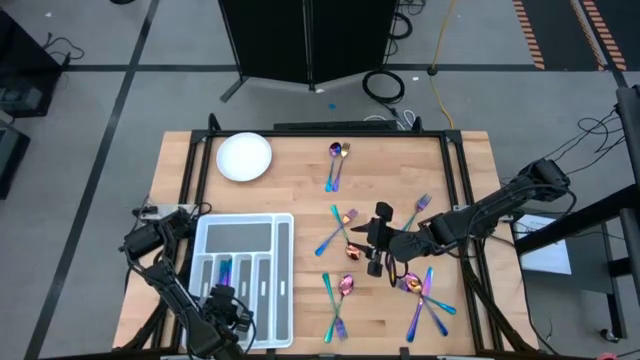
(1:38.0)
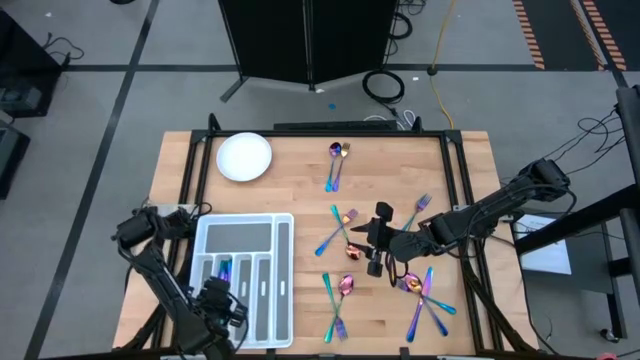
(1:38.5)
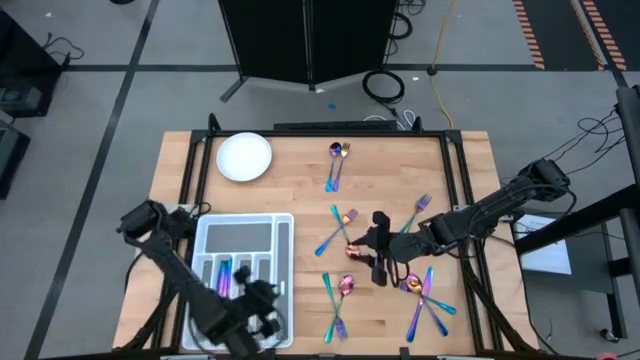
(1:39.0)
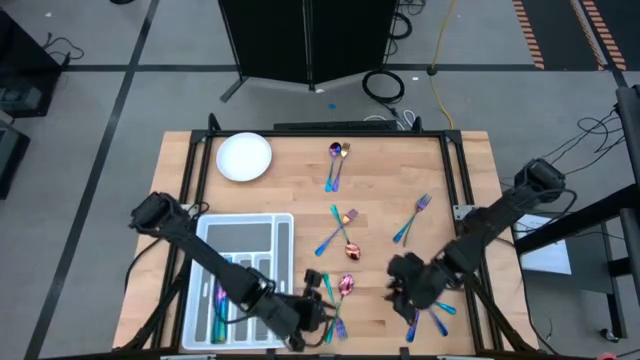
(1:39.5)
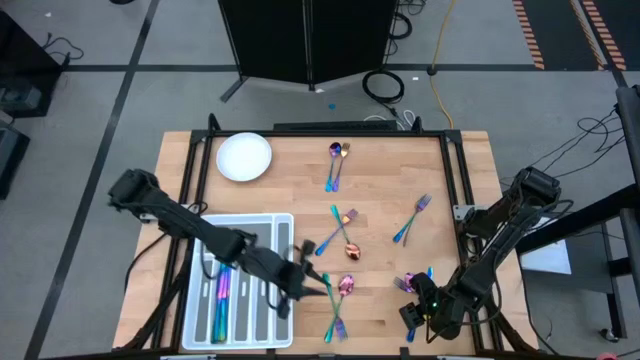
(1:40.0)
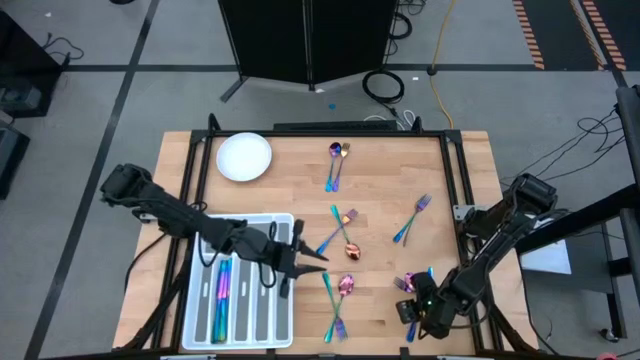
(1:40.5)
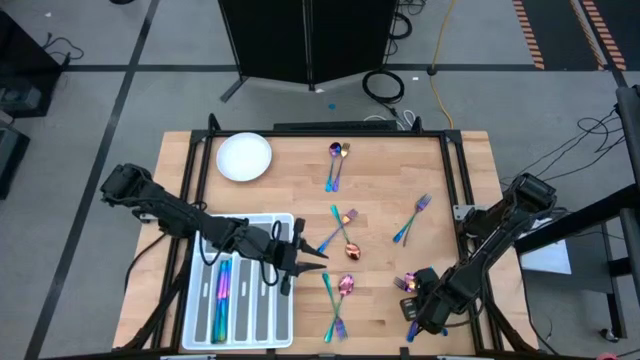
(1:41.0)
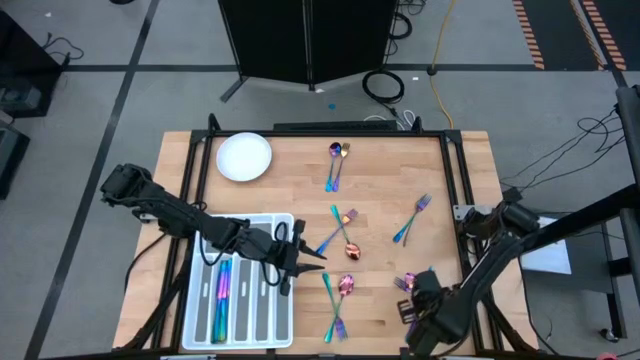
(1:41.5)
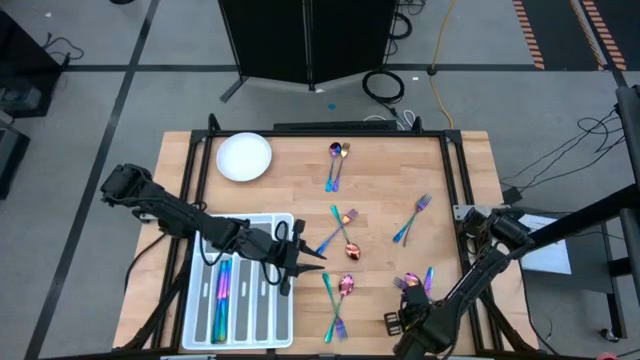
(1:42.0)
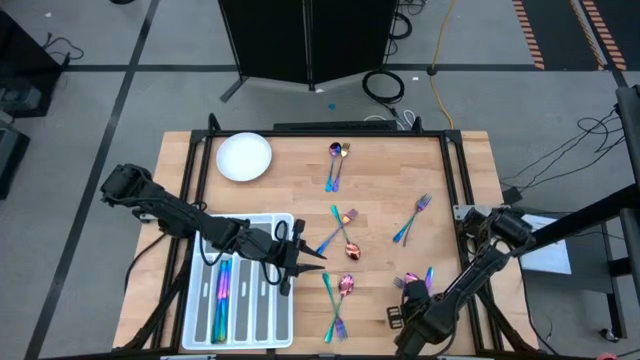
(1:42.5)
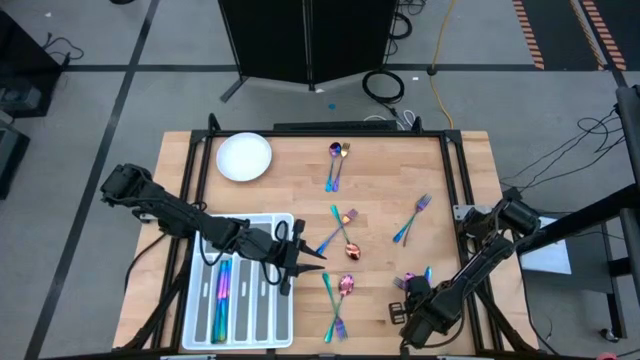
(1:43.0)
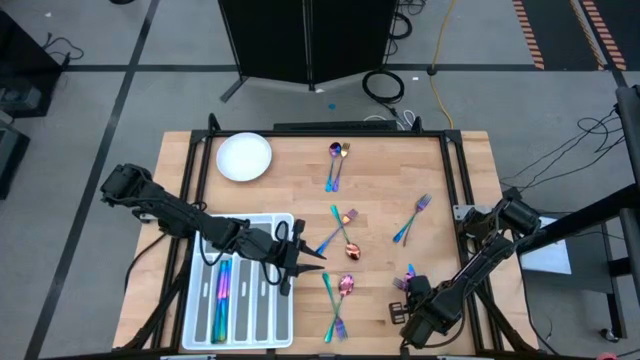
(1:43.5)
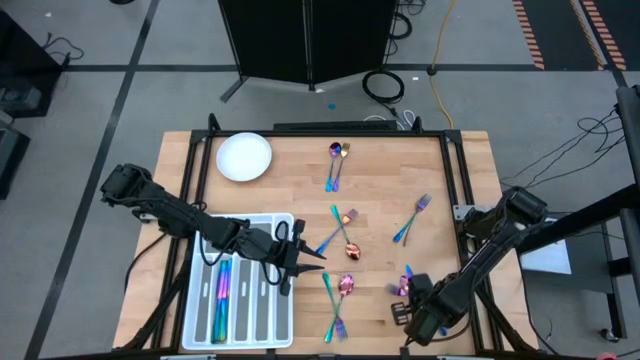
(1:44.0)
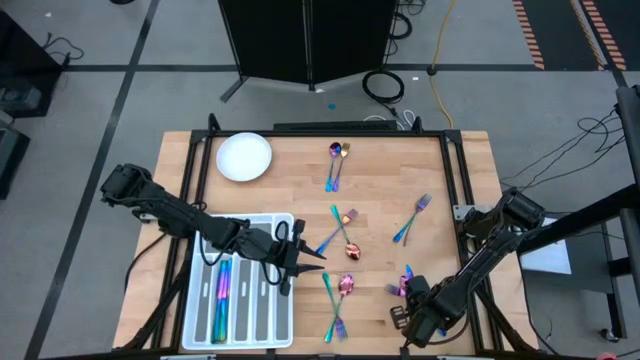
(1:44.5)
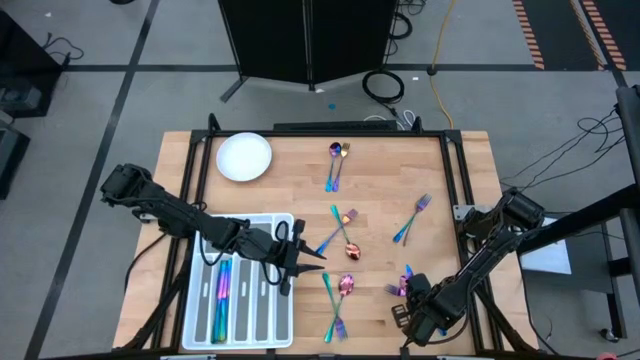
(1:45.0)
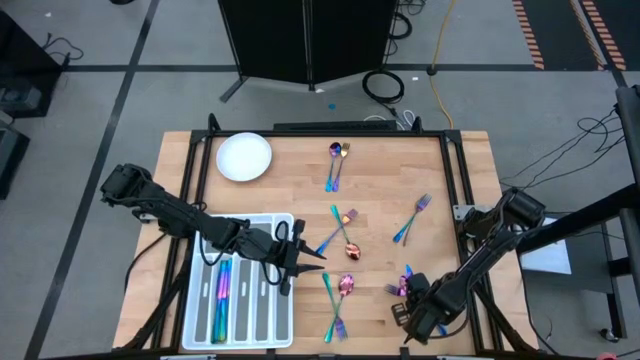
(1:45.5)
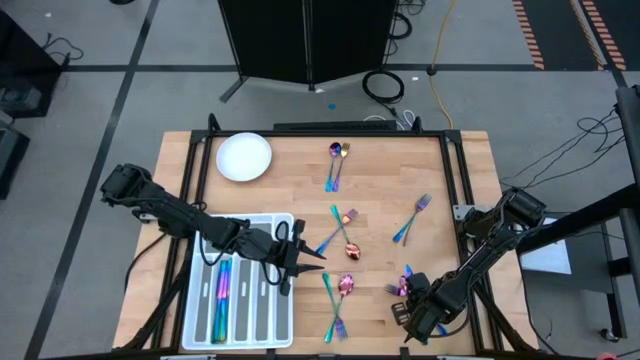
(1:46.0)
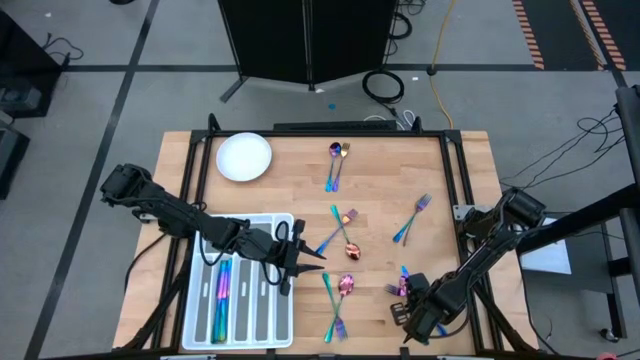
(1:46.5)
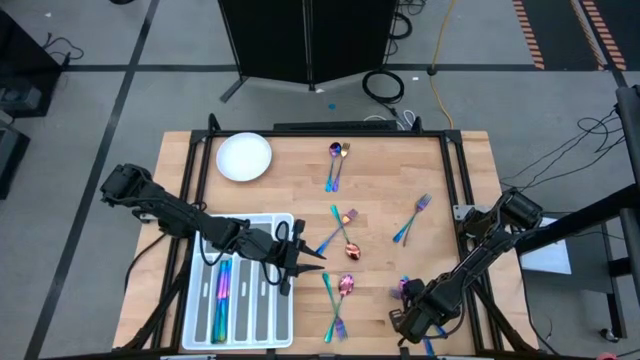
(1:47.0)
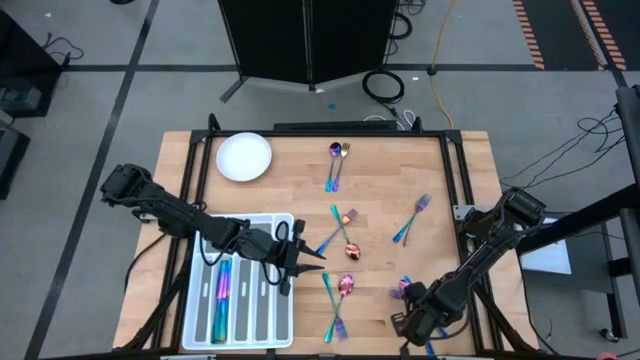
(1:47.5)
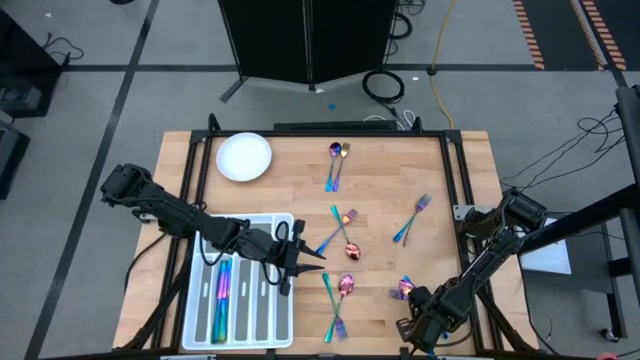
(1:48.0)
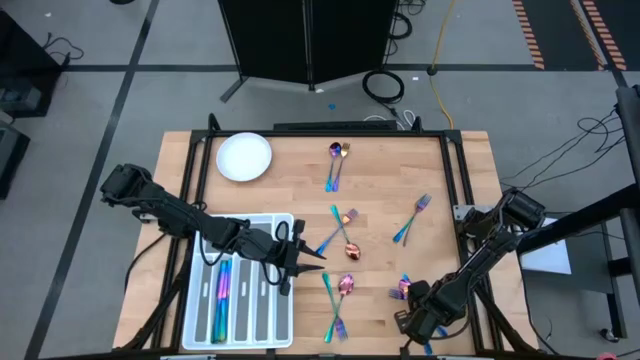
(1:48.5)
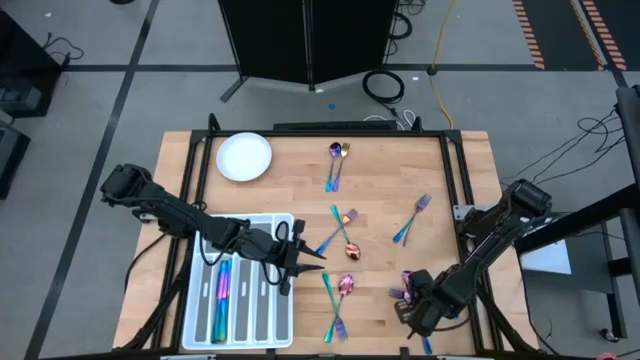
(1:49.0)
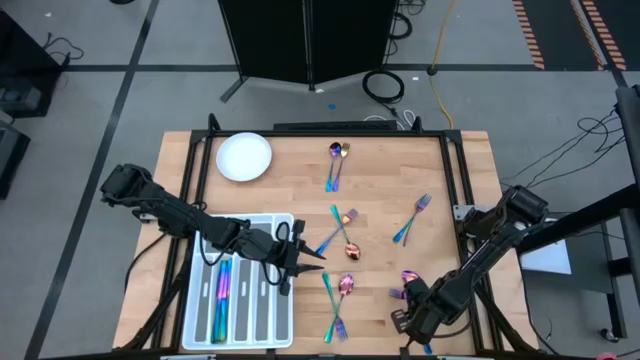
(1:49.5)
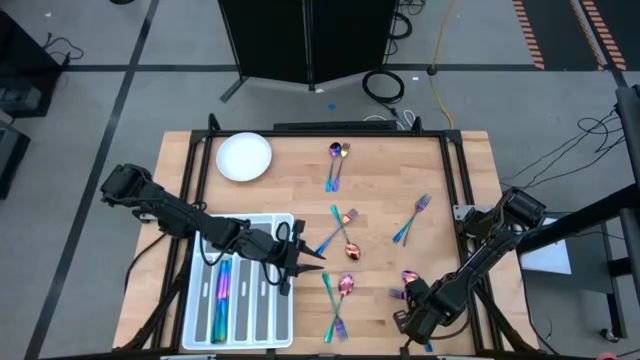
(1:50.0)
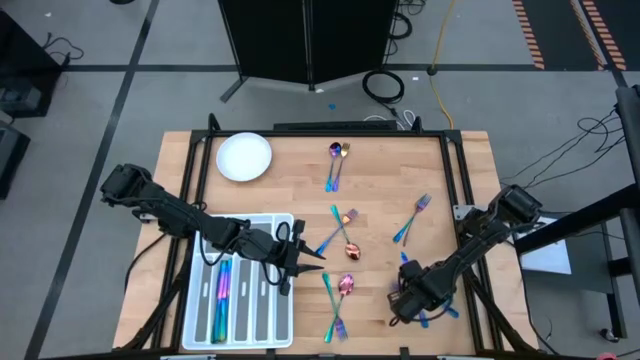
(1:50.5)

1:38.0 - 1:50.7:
Task: Sort silverware
Put the iridescent blue knife in the silverware tray

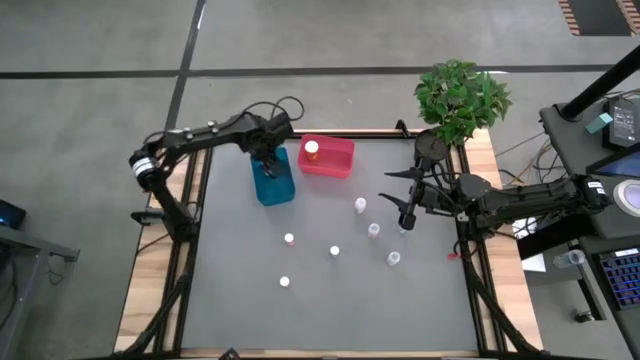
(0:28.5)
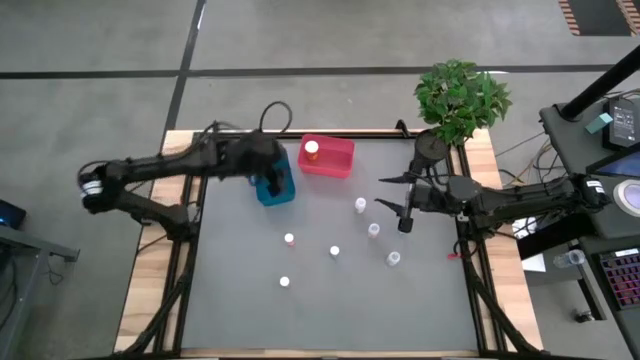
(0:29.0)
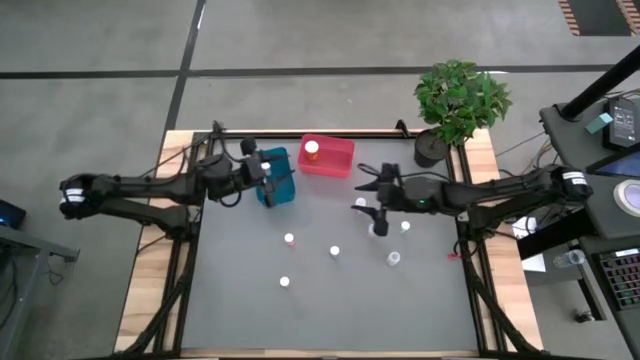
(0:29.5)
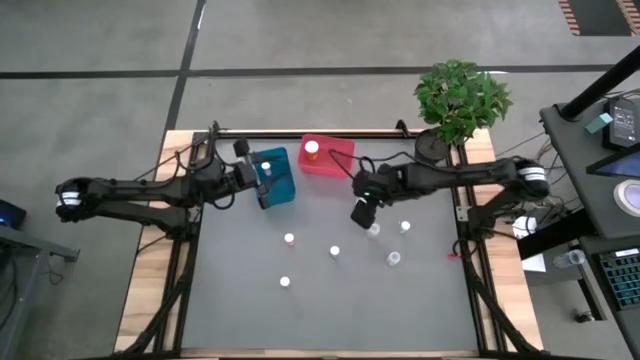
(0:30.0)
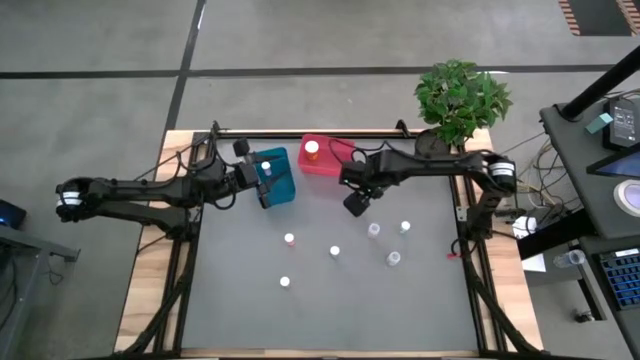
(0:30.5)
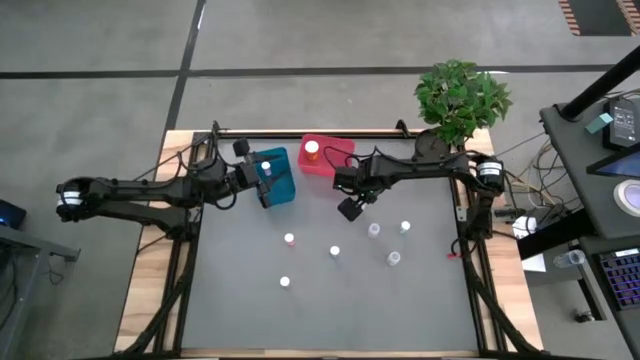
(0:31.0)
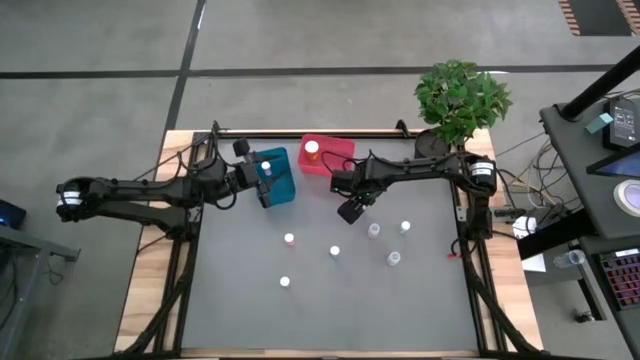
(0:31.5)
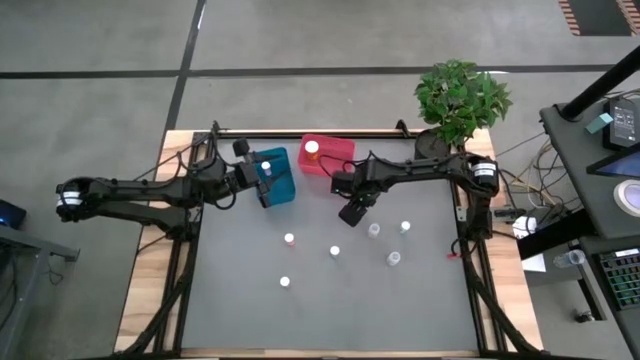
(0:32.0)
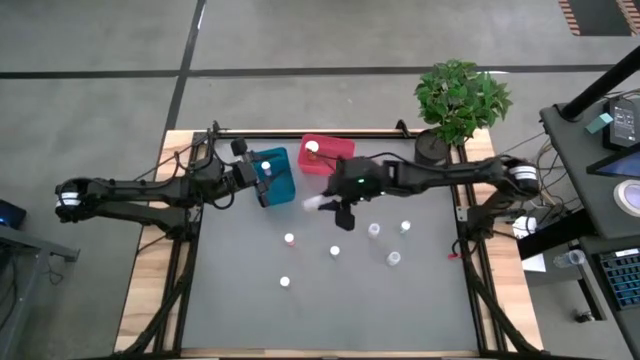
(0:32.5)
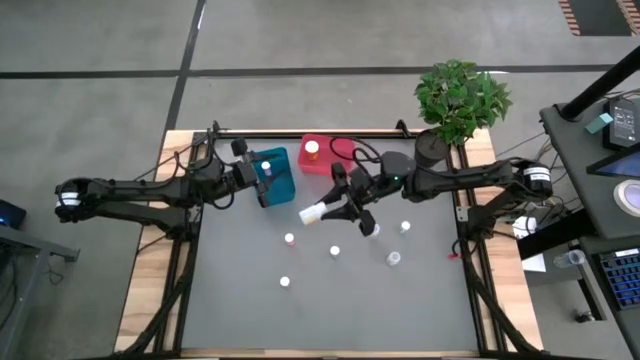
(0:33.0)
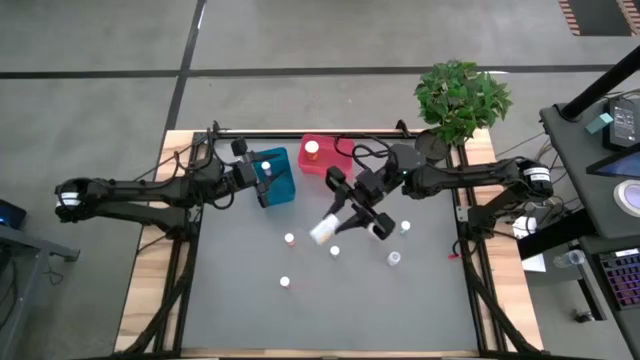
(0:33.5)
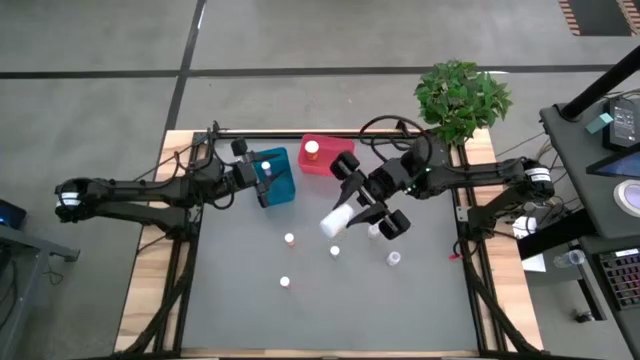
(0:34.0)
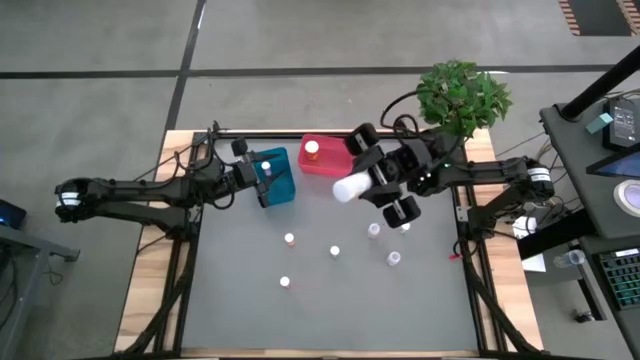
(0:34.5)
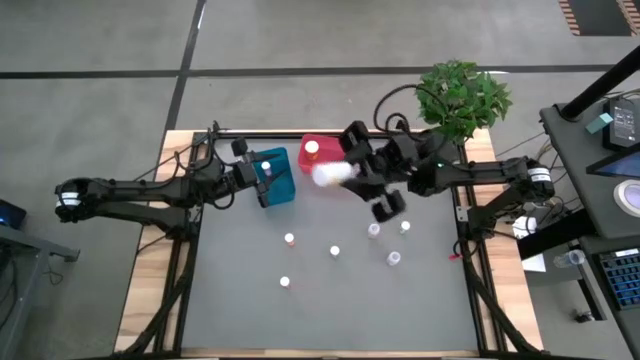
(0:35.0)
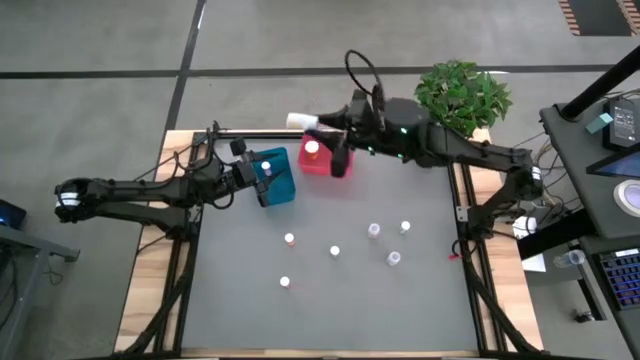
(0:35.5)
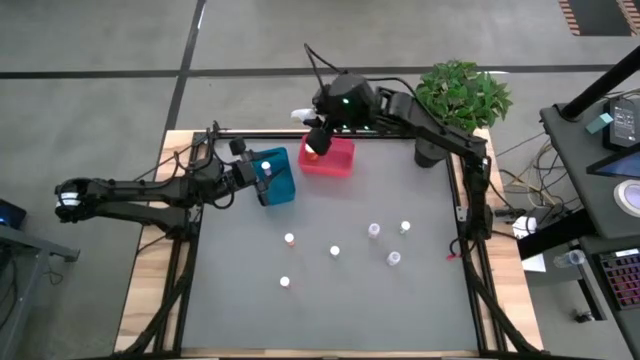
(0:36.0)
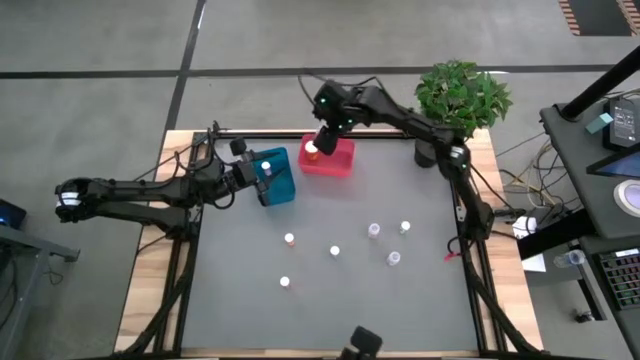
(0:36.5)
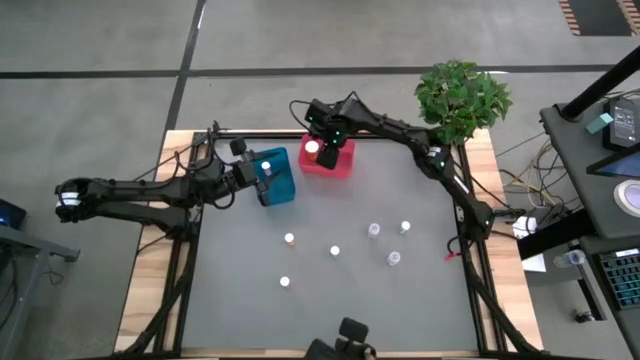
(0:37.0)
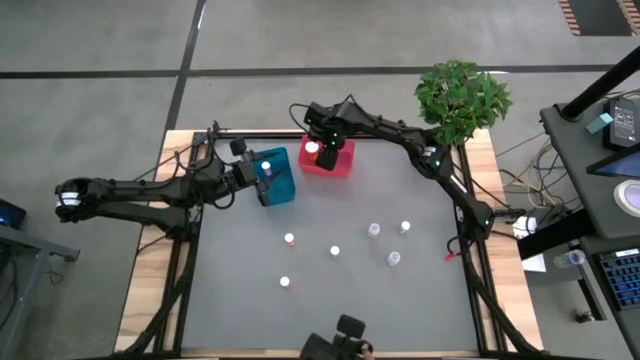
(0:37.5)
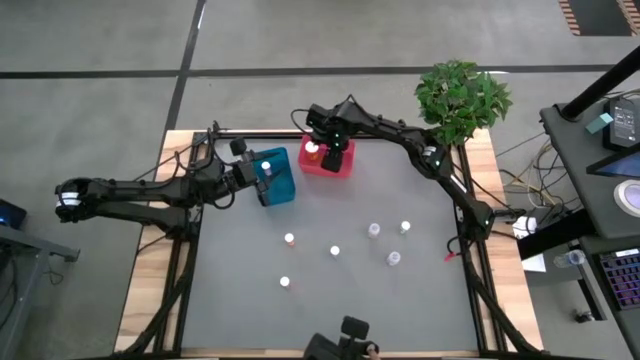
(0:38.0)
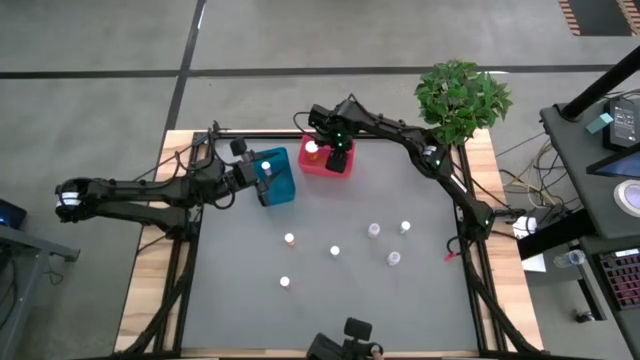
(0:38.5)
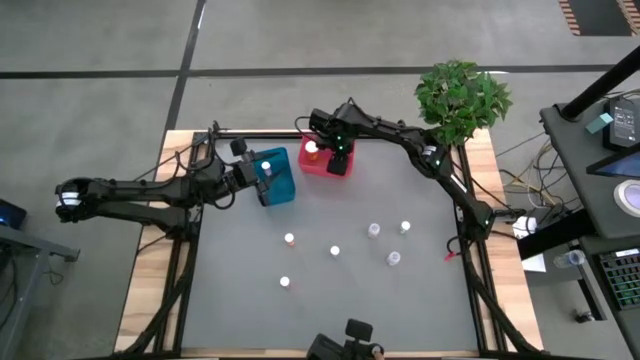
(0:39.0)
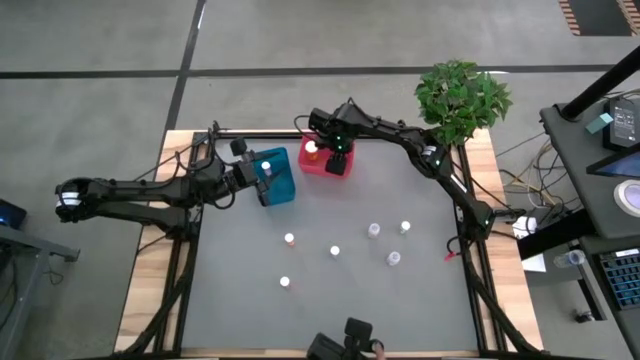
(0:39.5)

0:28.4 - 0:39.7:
Task: Pick and place medicine bottles into bin by pill shape (circle, oval)
Put the top white capsule bottle into the red bin
